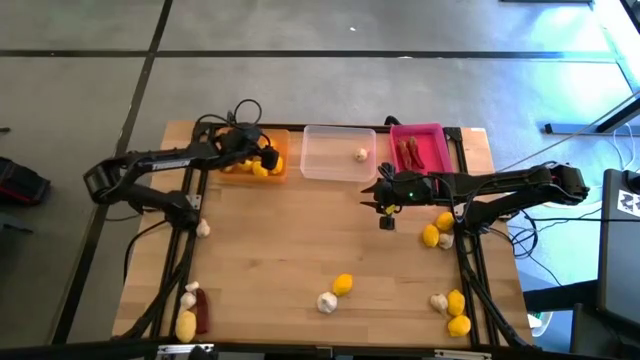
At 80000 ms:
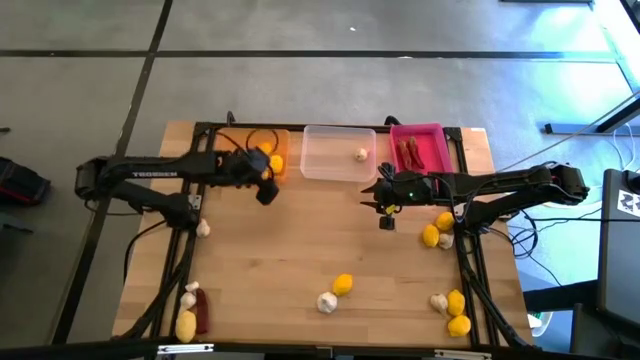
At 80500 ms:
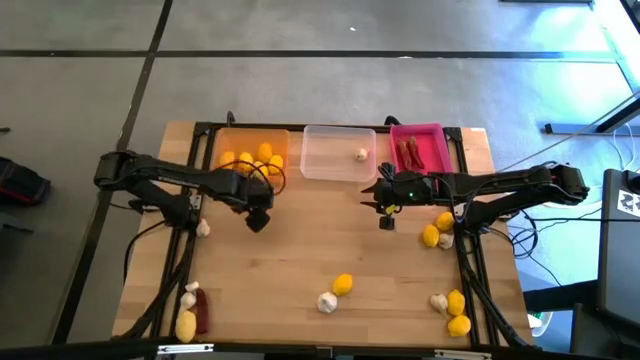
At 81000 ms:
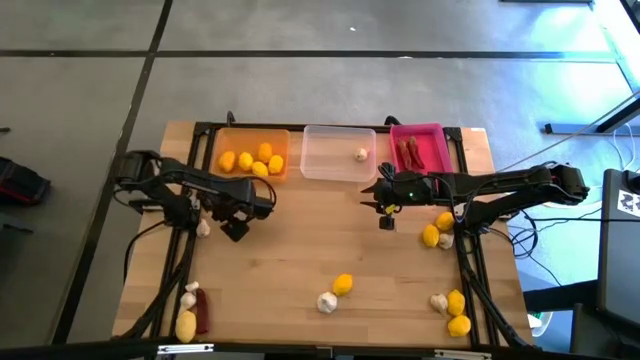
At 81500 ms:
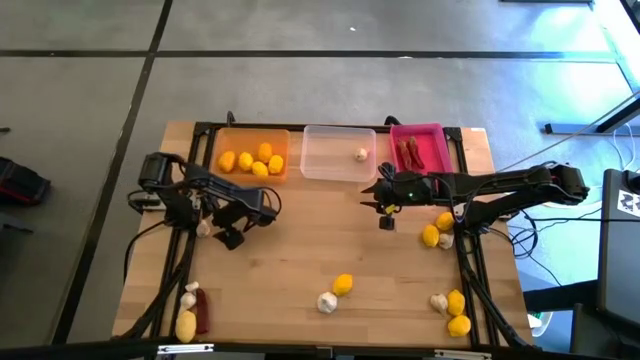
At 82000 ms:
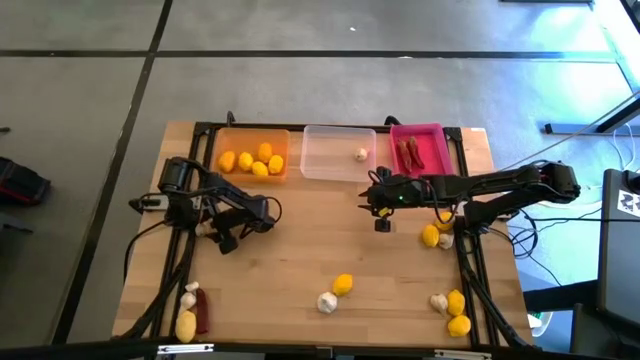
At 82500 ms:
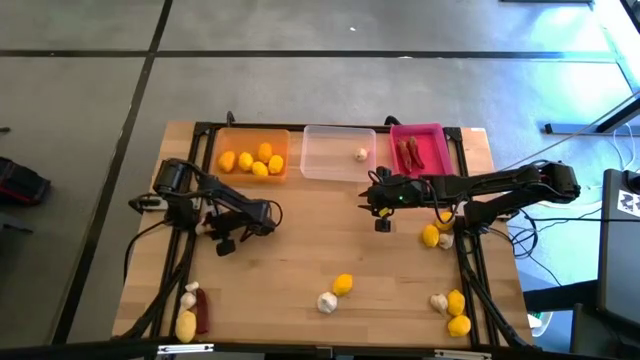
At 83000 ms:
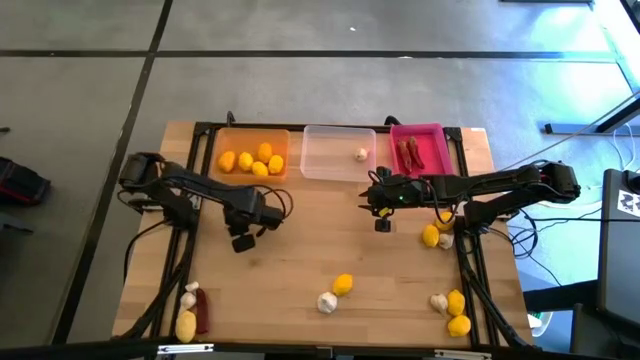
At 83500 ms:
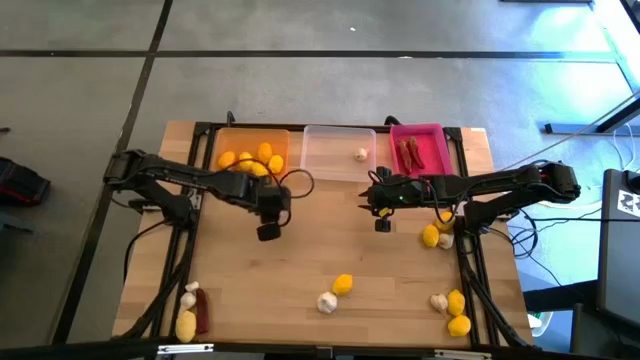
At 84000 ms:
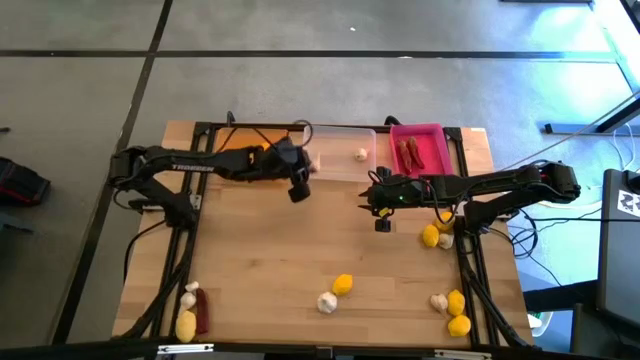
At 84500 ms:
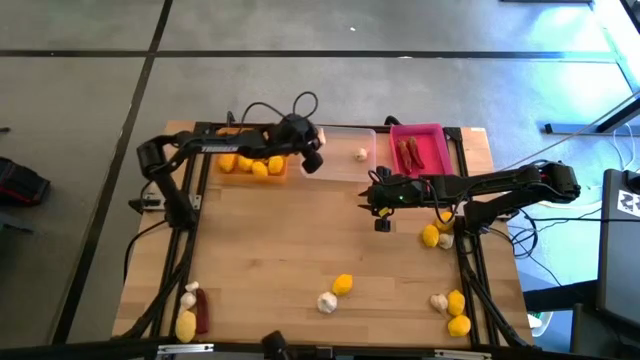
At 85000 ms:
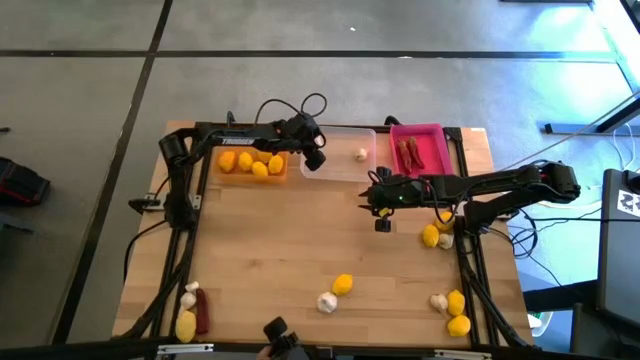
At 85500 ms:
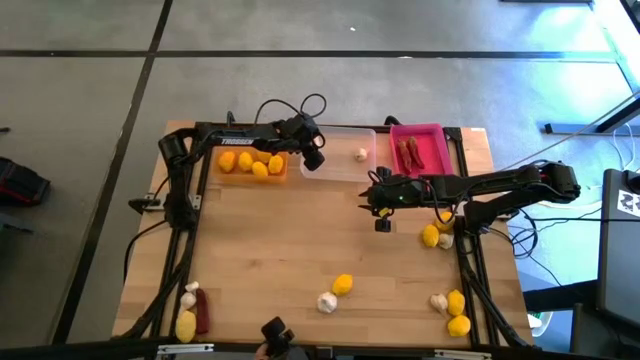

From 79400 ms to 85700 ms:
Task: Sort produce into baskets
Put the white garlic into the transparent bin

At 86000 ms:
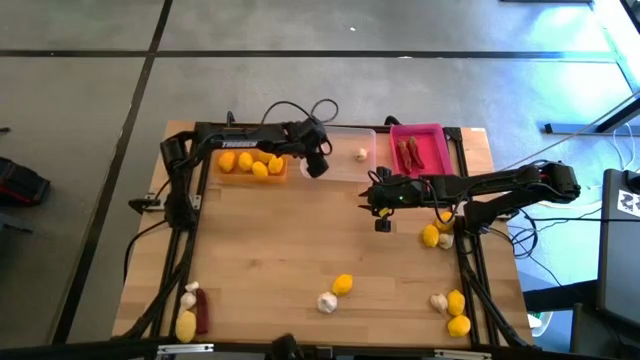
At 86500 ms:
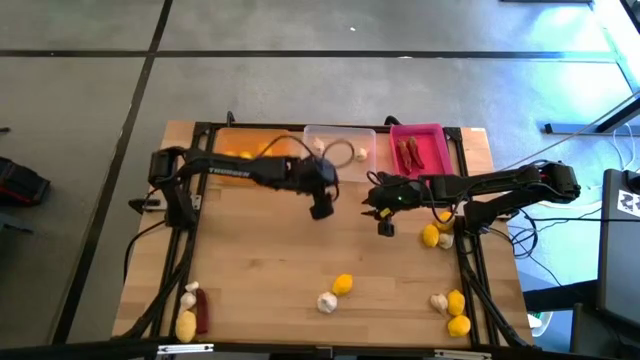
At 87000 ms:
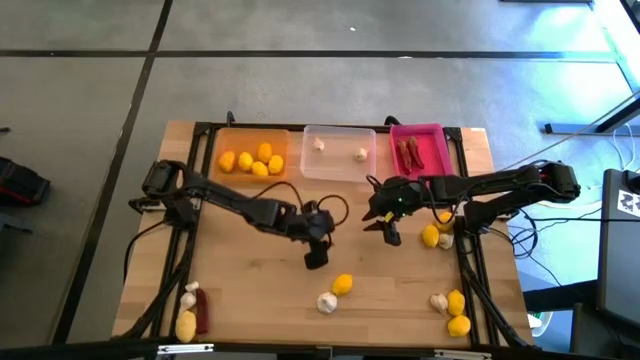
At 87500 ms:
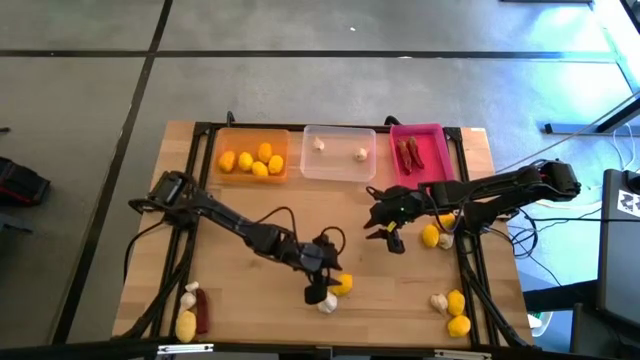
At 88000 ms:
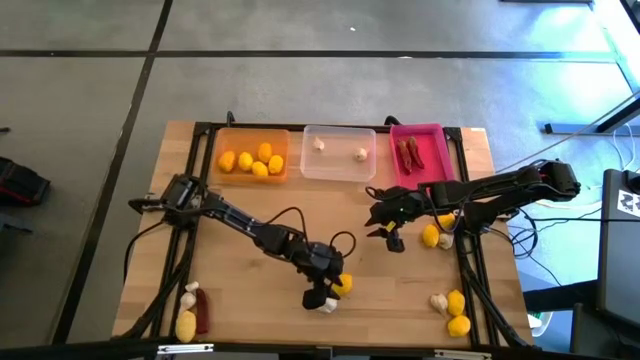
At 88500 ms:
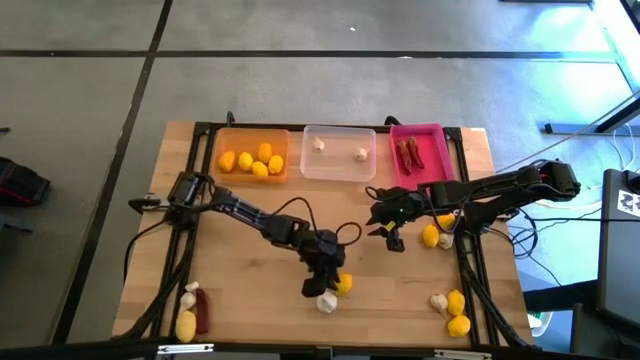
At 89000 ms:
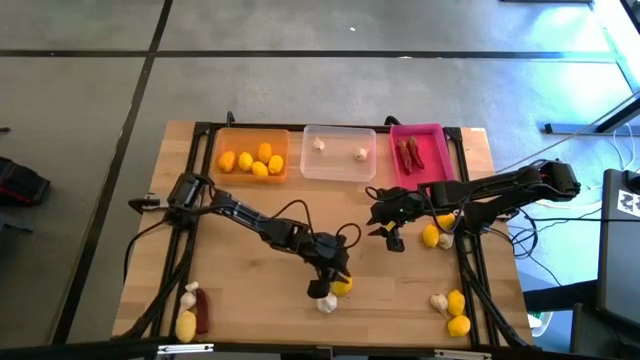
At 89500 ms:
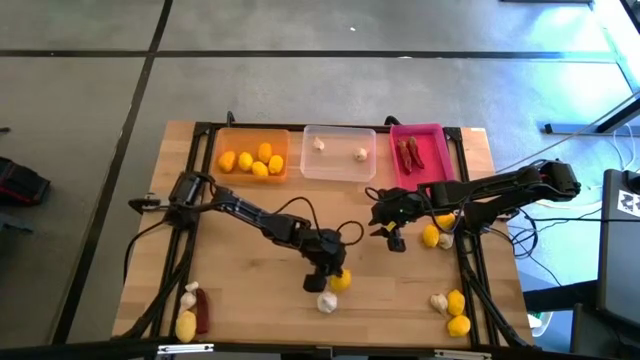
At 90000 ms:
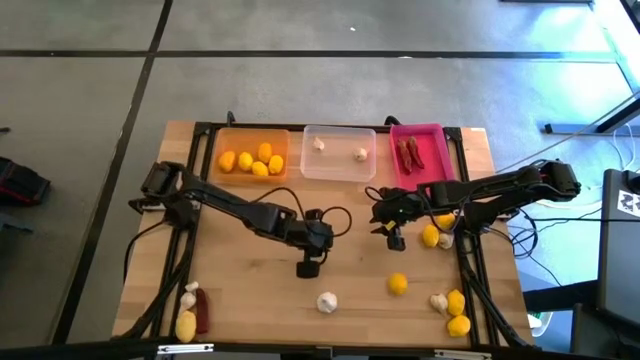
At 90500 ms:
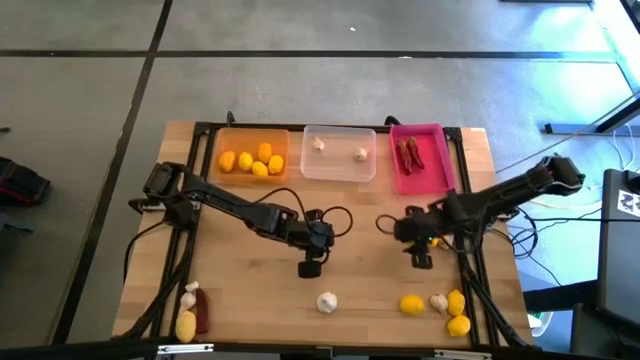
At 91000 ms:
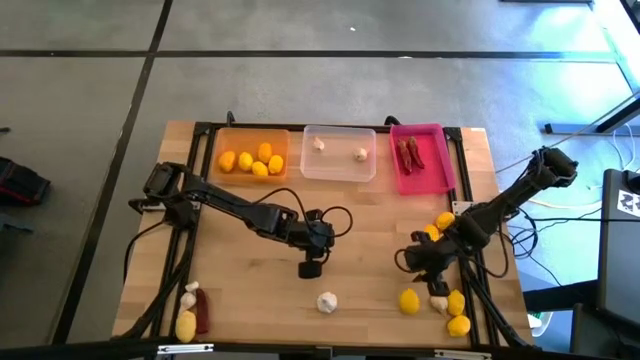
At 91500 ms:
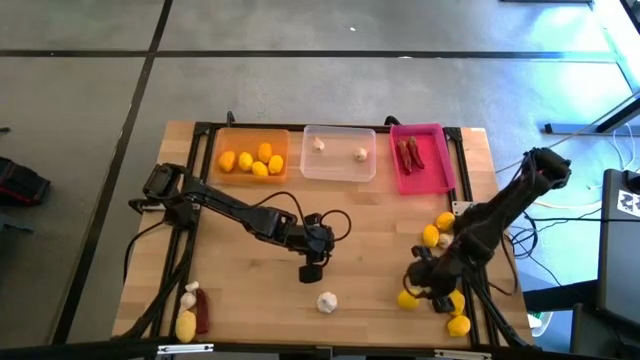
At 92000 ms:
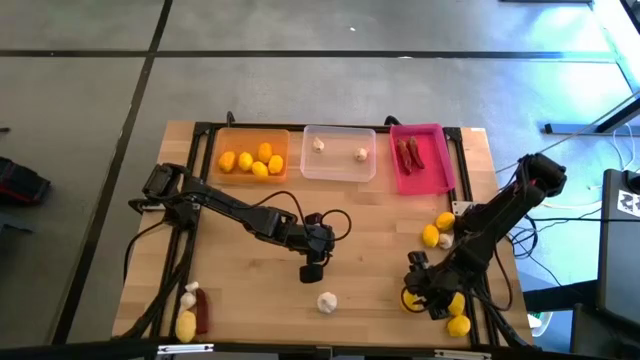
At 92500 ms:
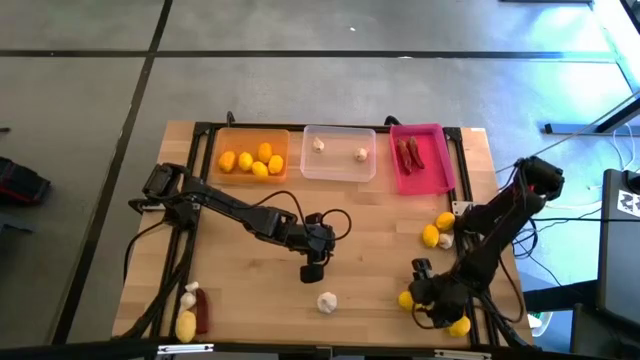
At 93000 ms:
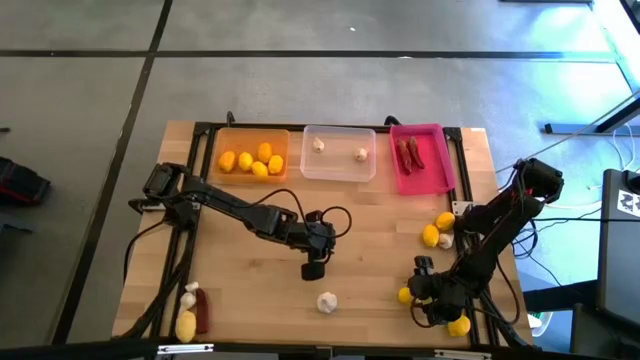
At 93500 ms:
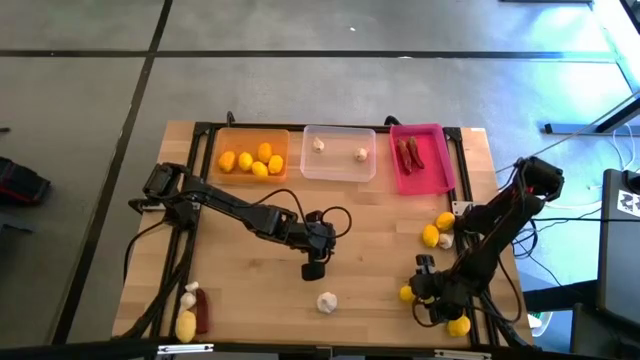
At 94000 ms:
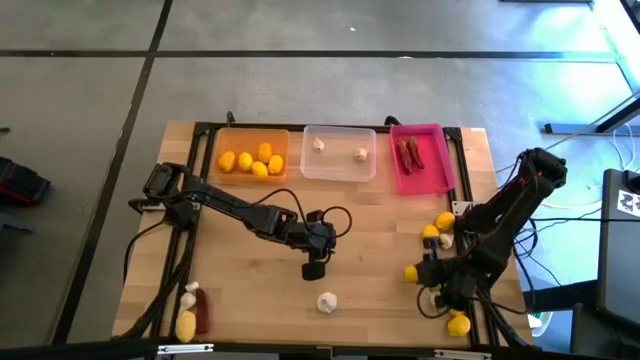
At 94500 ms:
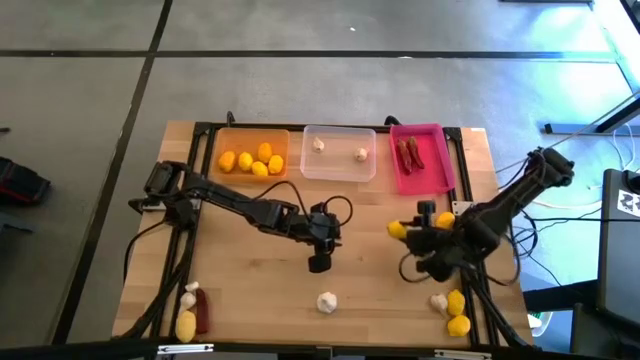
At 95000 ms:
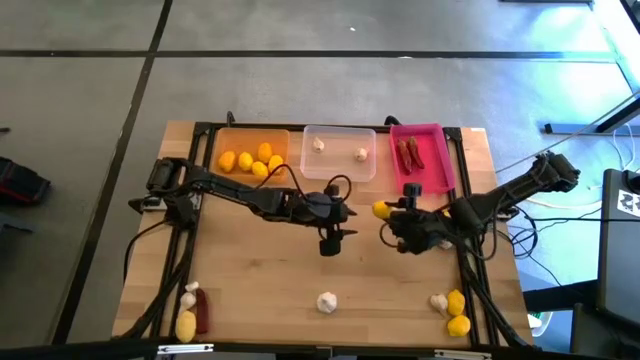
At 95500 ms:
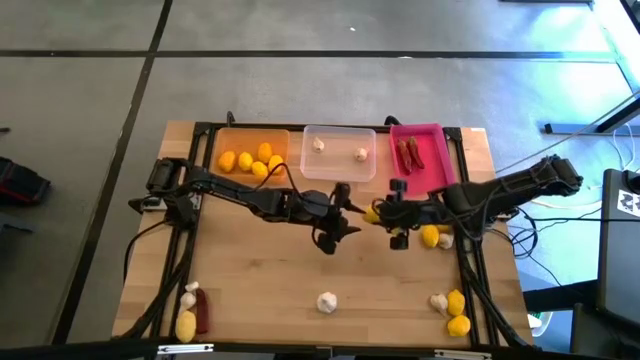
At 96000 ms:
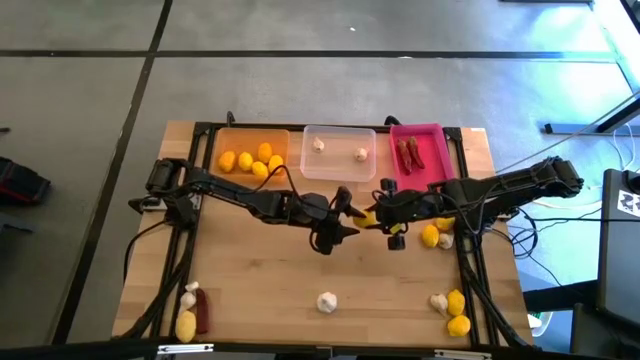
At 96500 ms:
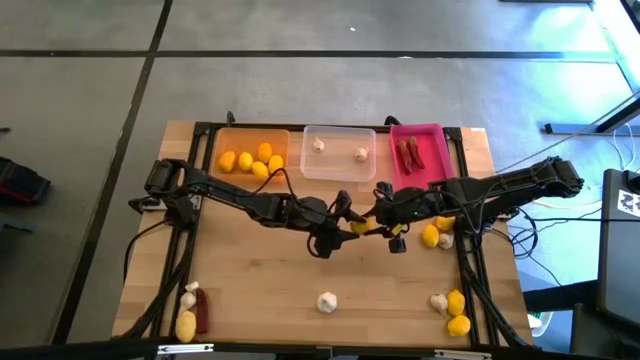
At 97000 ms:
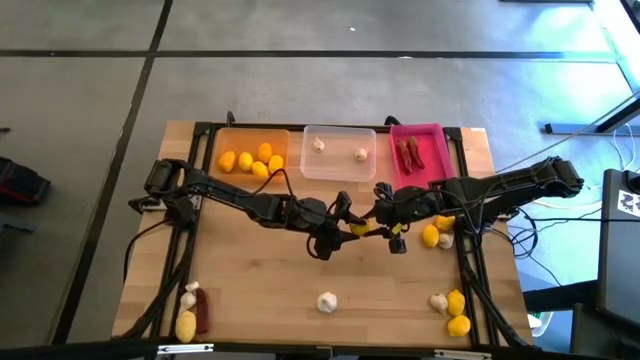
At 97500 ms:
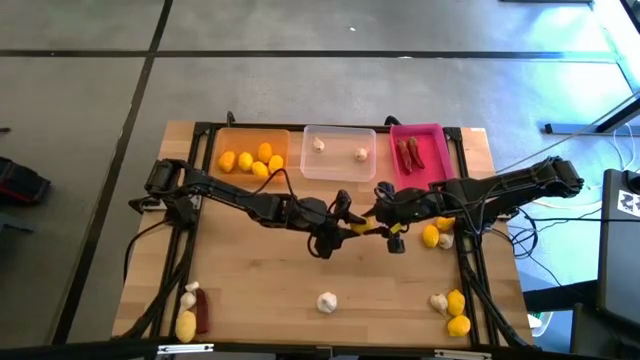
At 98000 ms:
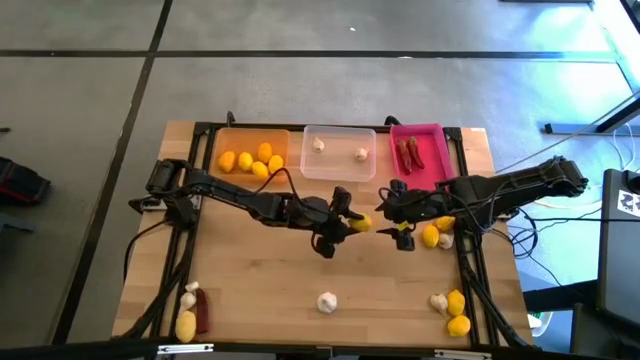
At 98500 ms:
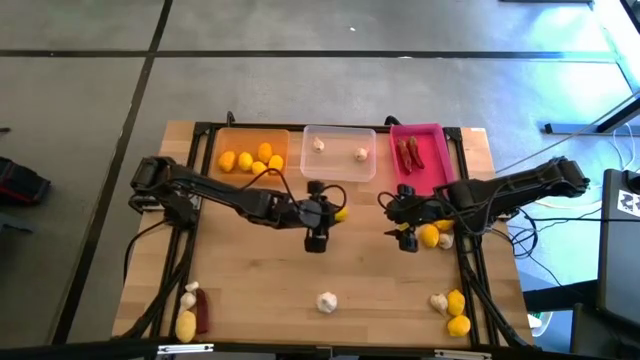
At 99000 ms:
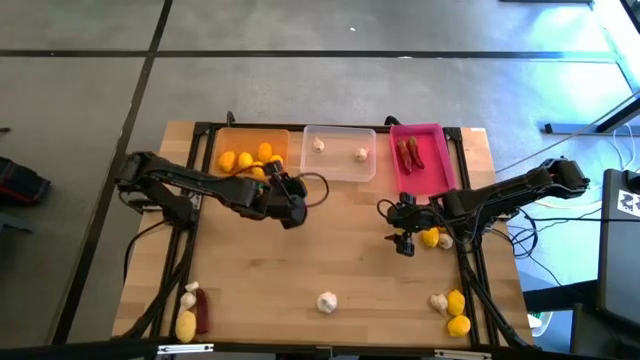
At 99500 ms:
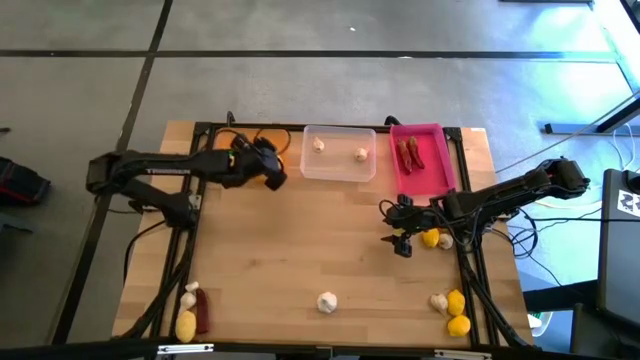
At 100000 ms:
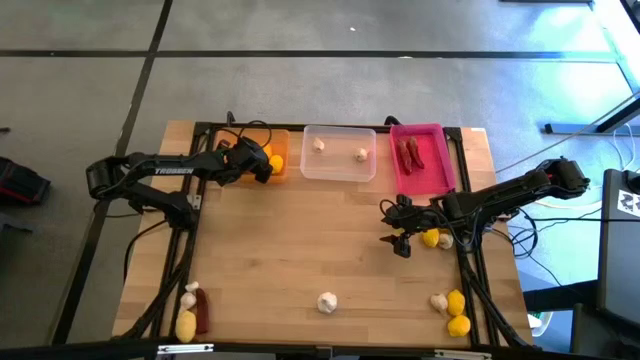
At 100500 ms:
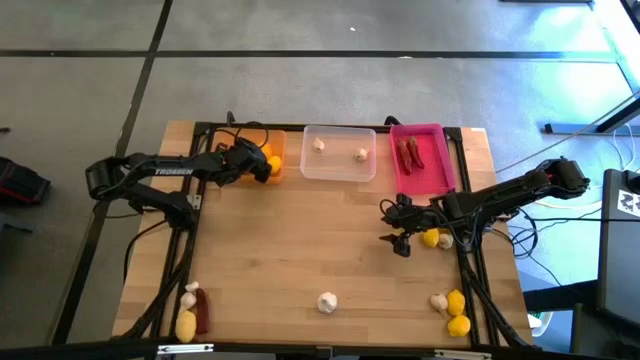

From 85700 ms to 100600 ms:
Put the yellow lemon into the orange bin
